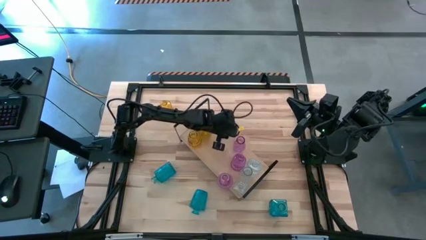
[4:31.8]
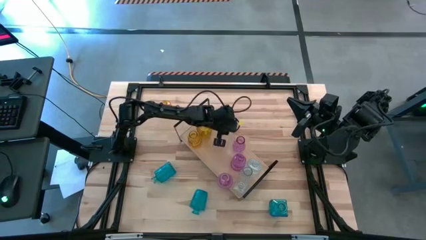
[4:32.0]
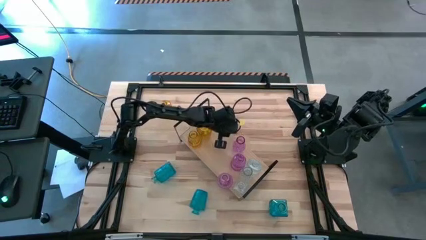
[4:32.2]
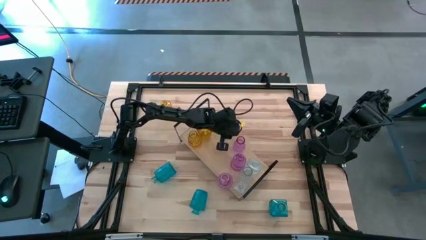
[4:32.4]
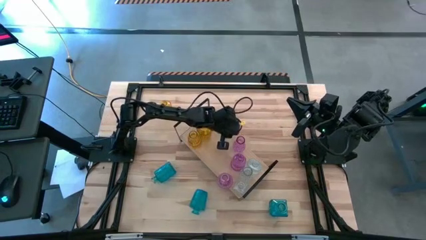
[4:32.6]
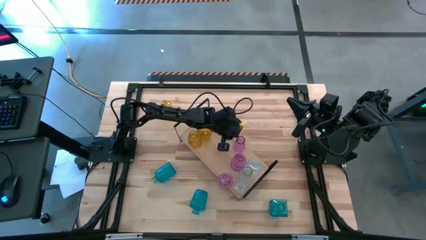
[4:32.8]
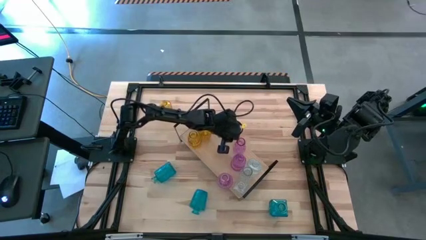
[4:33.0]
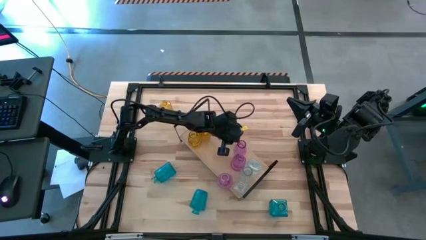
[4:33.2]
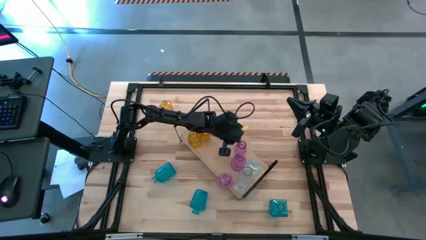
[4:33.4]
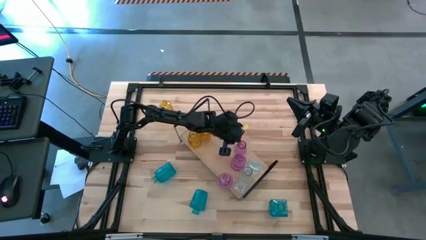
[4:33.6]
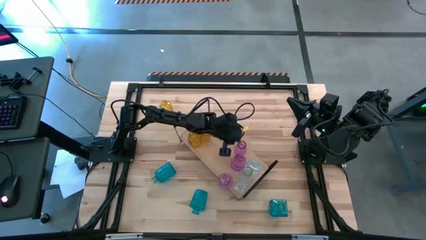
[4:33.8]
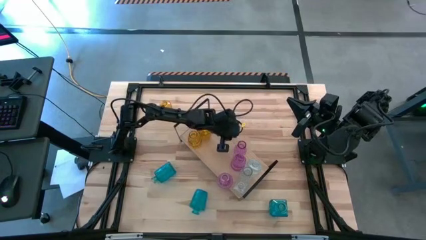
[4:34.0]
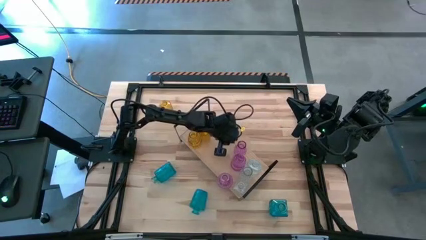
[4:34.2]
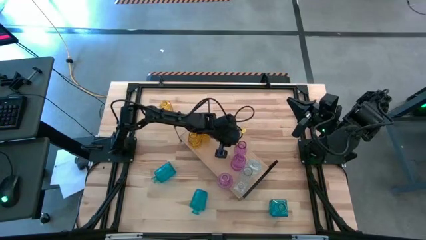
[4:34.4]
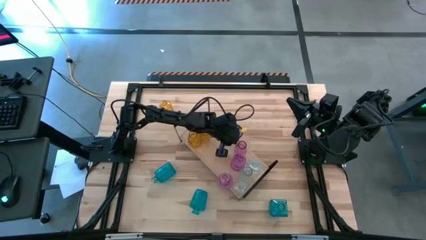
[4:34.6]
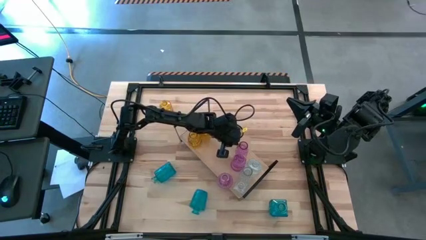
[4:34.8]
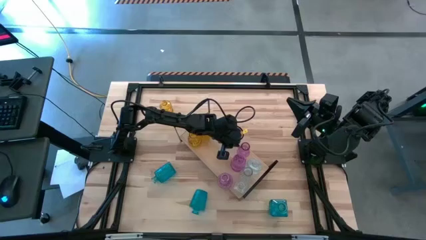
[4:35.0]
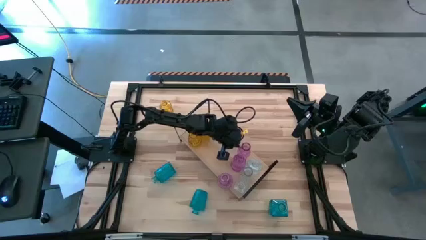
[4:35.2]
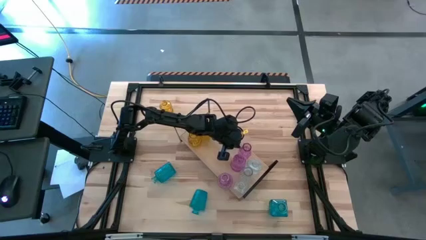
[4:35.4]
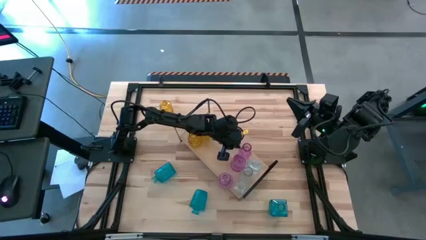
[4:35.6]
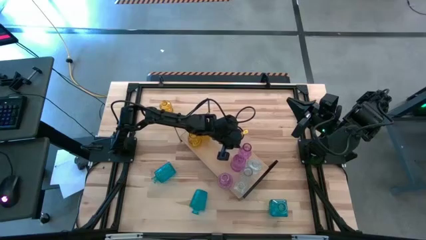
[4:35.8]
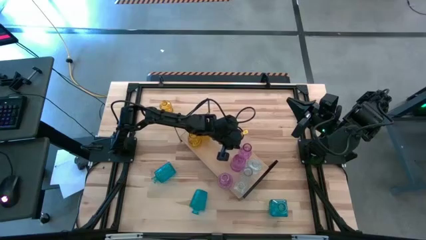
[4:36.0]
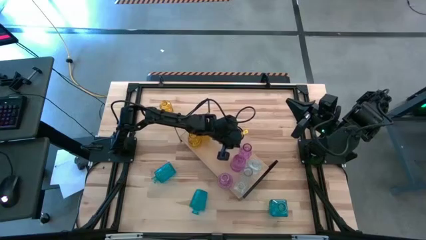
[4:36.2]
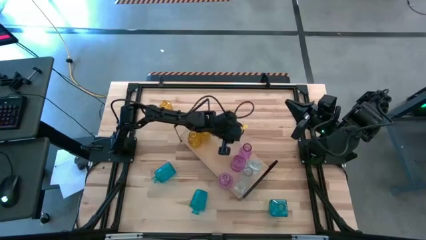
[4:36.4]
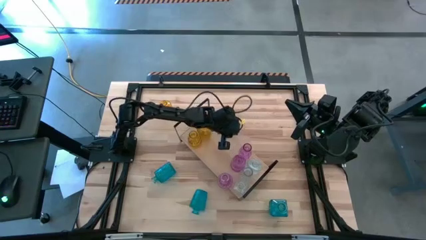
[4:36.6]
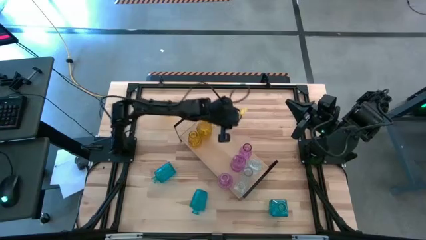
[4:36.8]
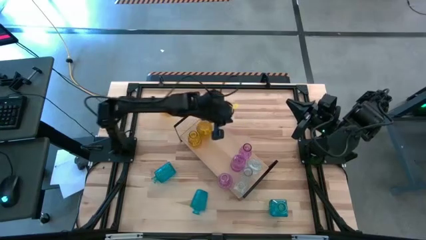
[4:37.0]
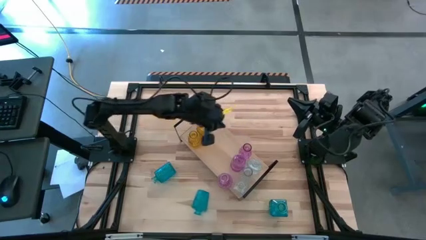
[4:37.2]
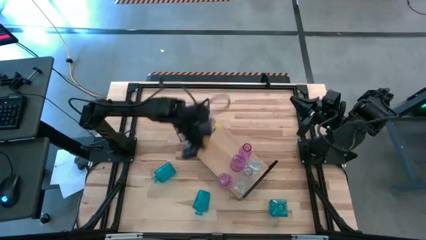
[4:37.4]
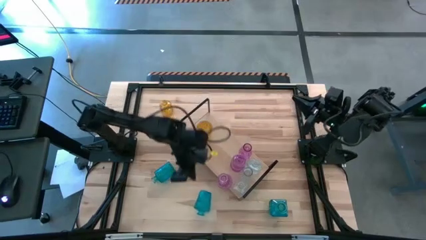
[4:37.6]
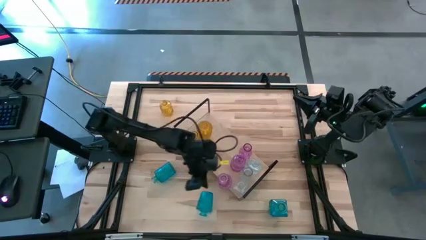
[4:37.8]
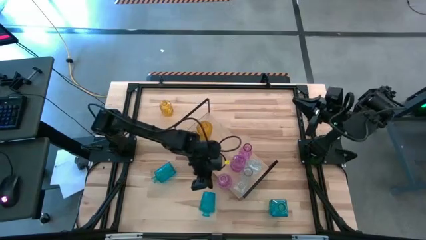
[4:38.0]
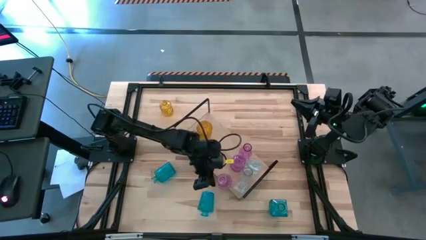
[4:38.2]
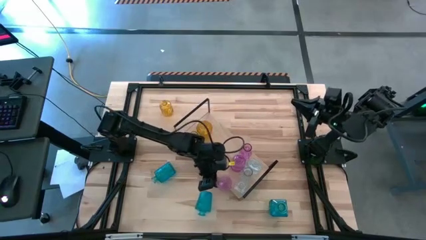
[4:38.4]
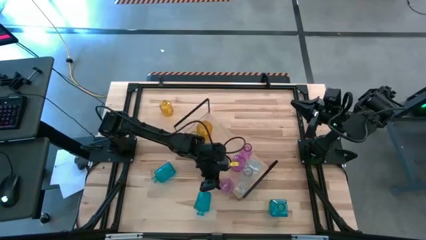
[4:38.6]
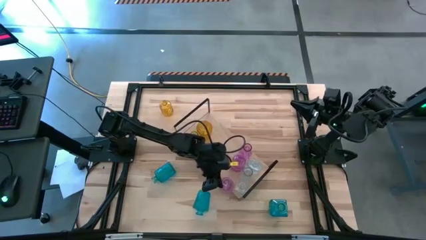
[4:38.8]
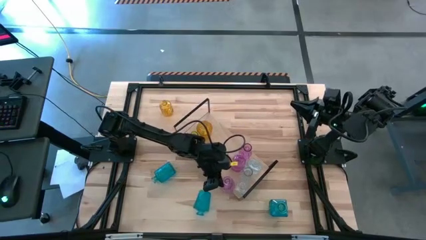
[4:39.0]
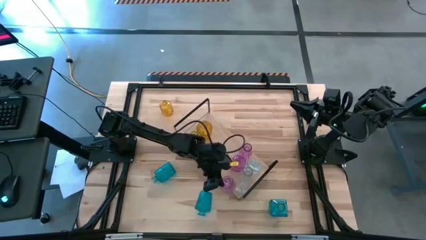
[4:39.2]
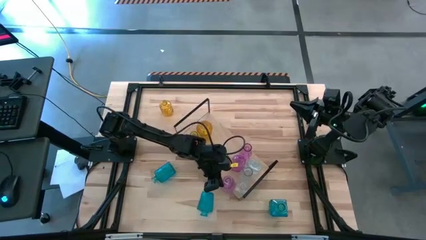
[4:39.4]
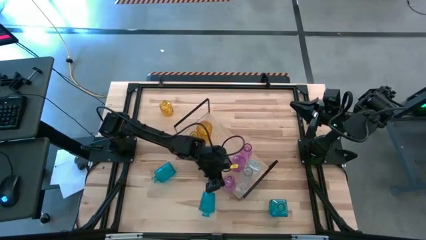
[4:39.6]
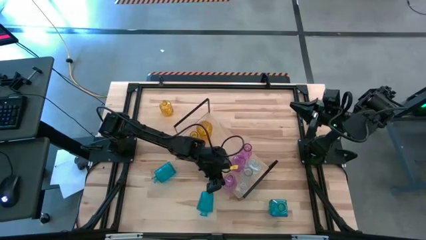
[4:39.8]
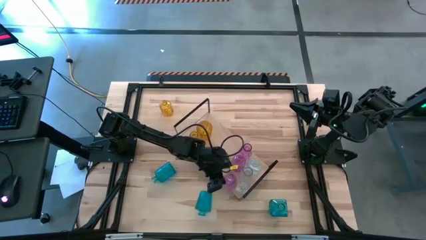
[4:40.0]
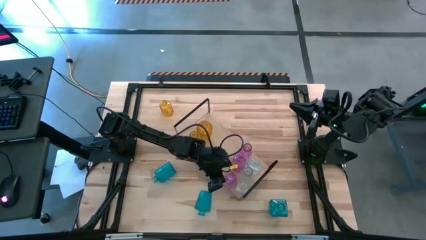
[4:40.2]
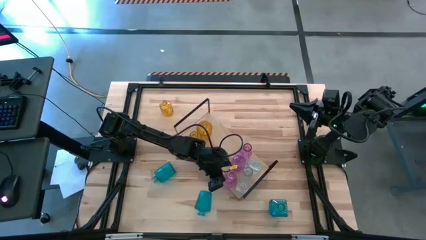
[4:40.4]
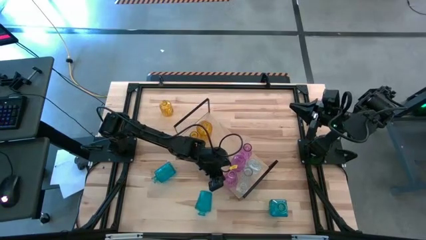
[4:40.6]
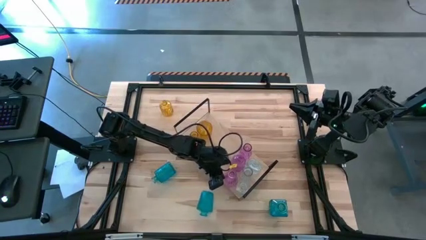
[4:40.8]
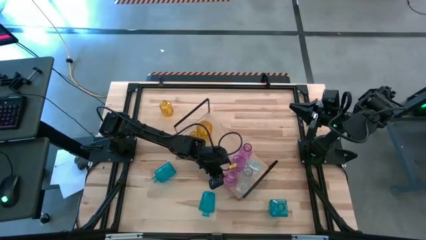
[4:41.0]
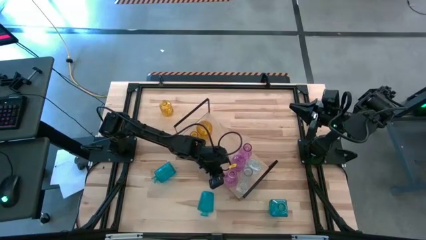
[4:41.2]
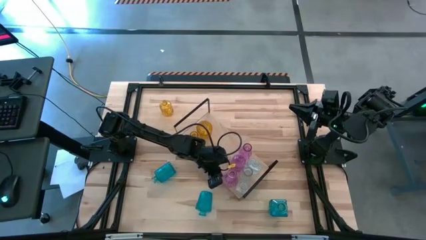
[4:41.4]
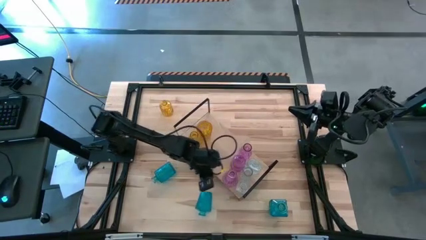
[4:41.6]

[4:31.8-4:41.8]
Task: sort vases onto shelf
Adjust the pink crystal vases
